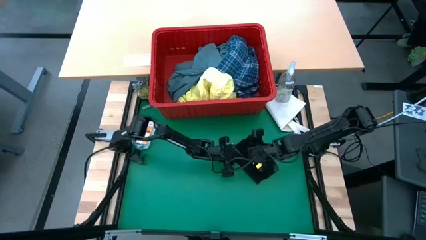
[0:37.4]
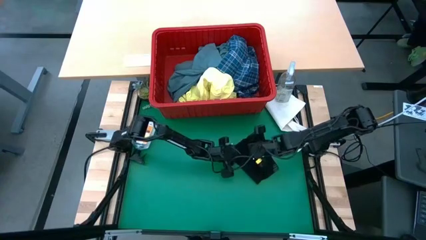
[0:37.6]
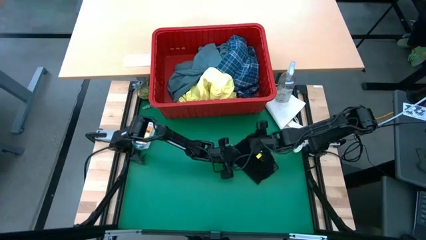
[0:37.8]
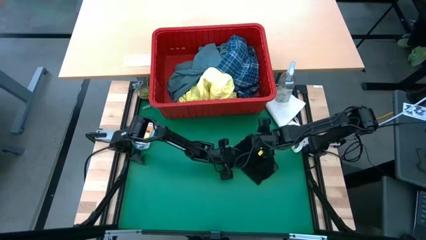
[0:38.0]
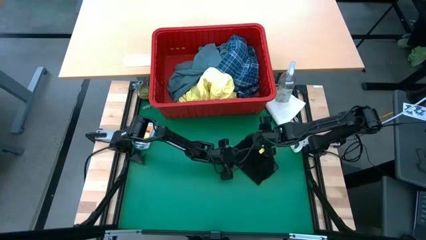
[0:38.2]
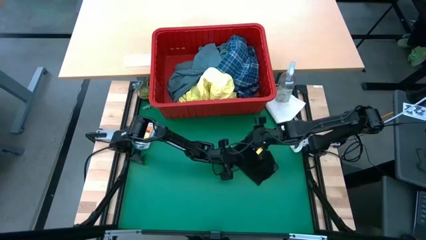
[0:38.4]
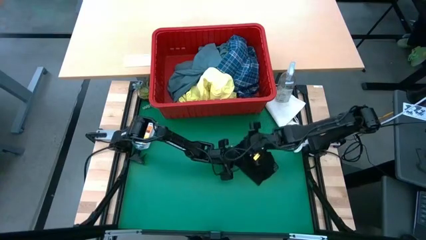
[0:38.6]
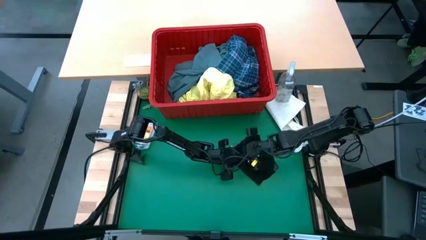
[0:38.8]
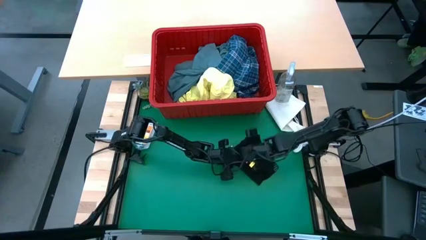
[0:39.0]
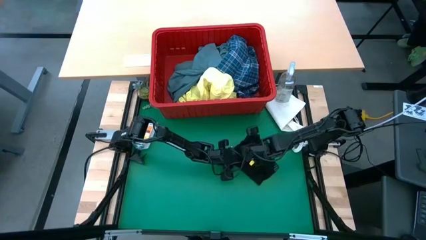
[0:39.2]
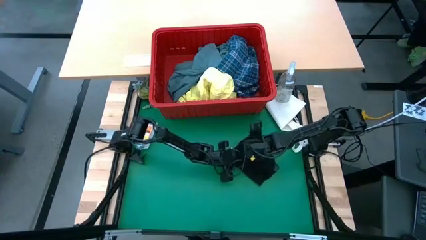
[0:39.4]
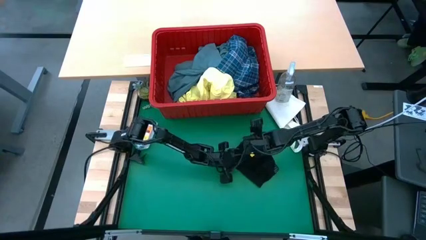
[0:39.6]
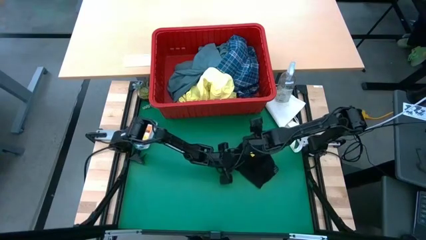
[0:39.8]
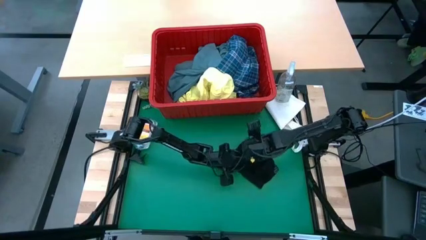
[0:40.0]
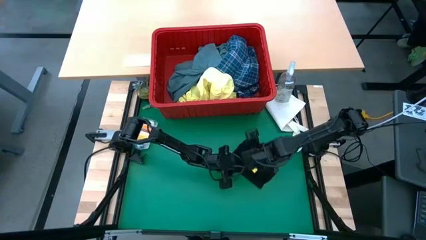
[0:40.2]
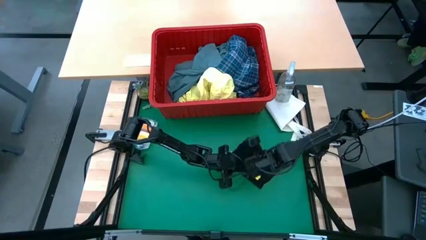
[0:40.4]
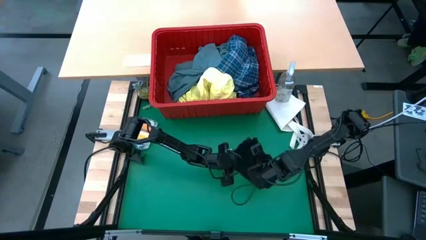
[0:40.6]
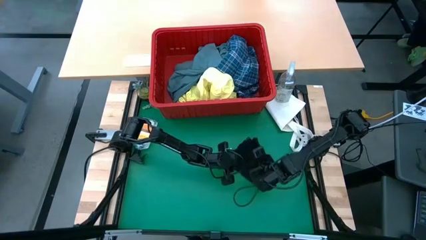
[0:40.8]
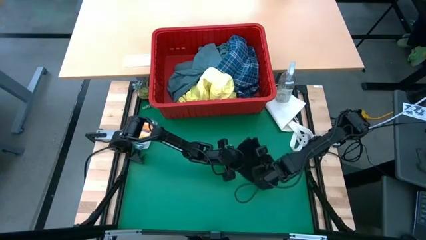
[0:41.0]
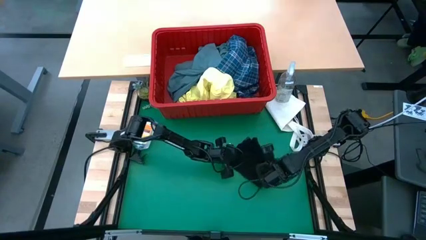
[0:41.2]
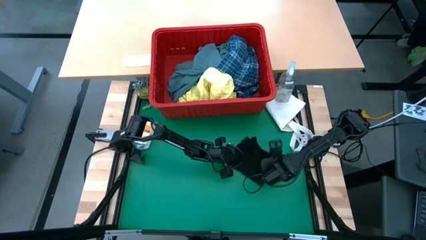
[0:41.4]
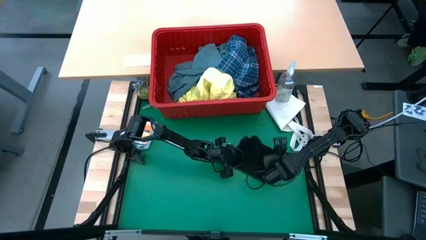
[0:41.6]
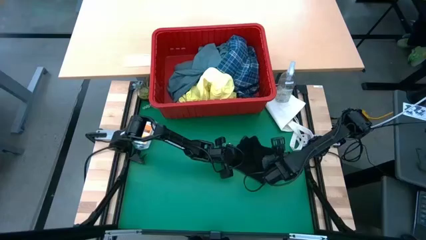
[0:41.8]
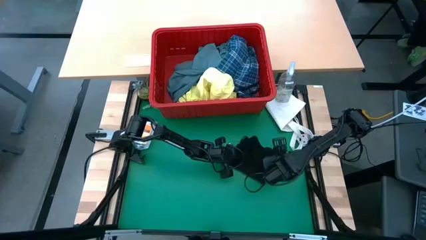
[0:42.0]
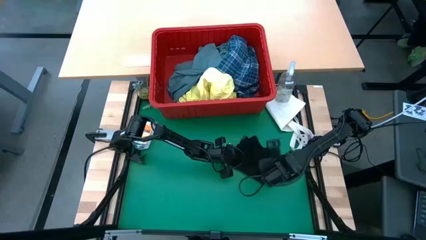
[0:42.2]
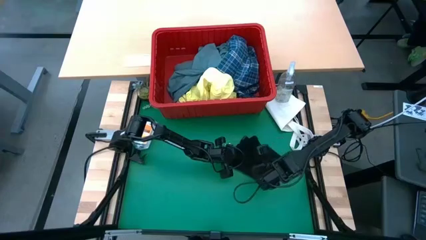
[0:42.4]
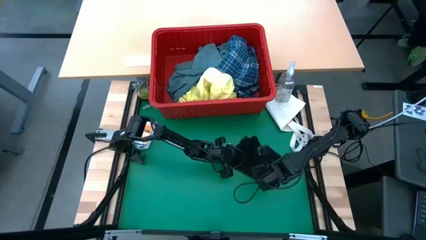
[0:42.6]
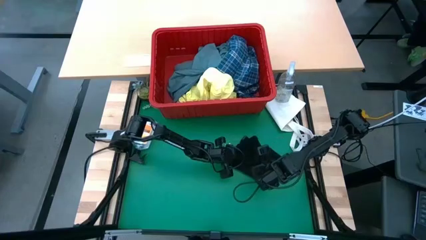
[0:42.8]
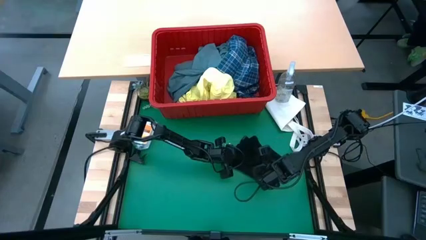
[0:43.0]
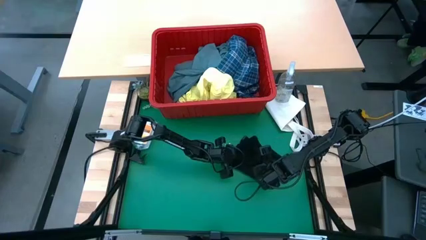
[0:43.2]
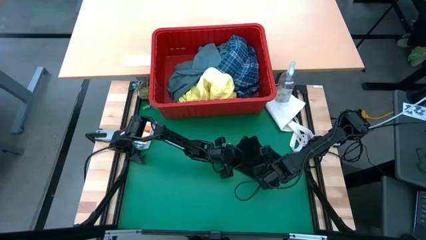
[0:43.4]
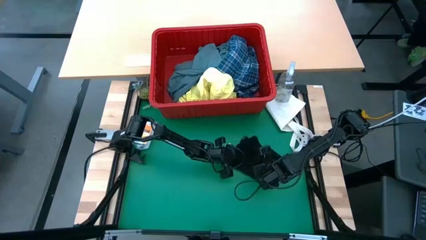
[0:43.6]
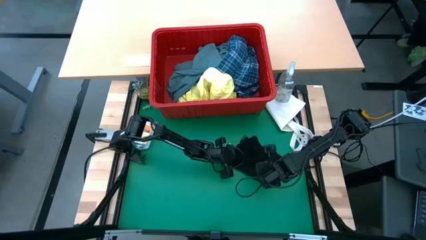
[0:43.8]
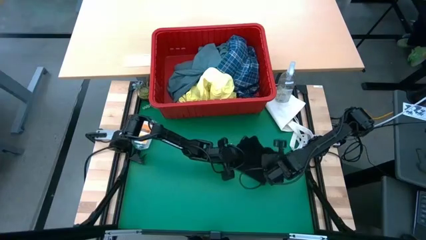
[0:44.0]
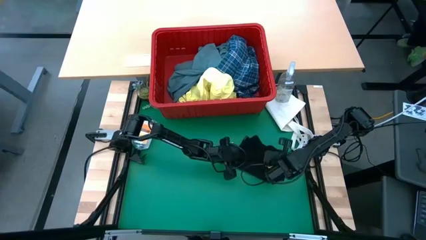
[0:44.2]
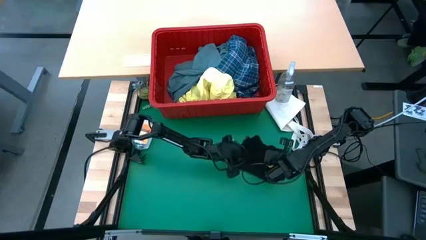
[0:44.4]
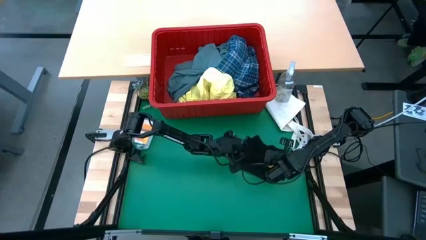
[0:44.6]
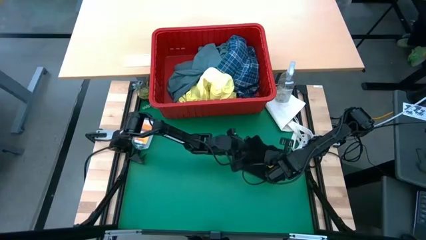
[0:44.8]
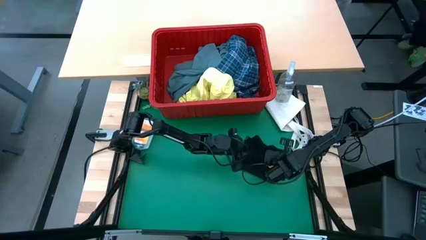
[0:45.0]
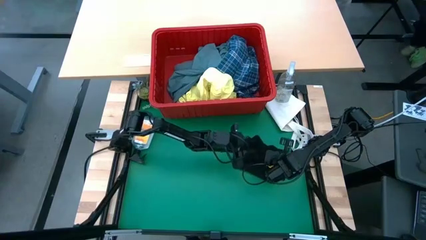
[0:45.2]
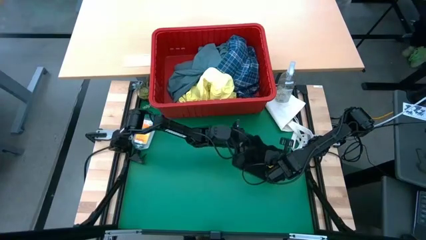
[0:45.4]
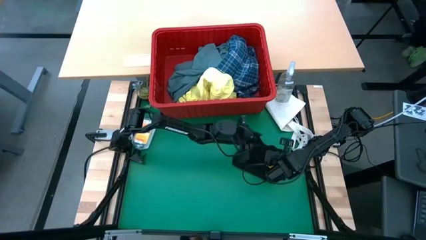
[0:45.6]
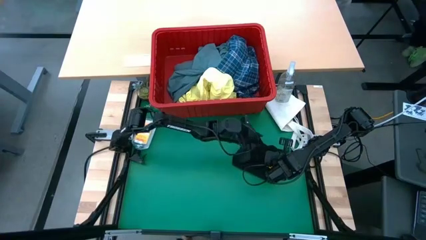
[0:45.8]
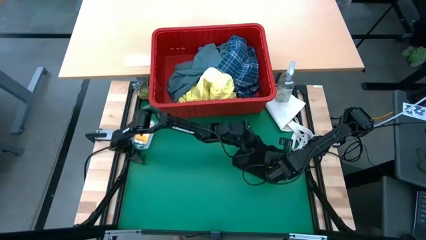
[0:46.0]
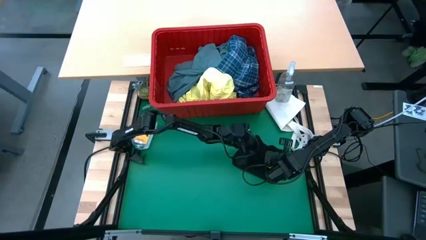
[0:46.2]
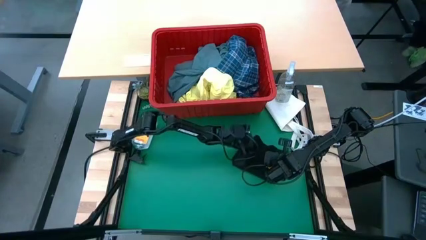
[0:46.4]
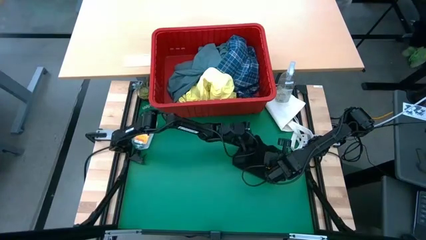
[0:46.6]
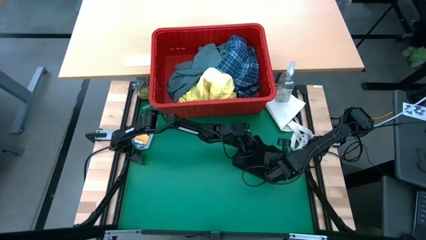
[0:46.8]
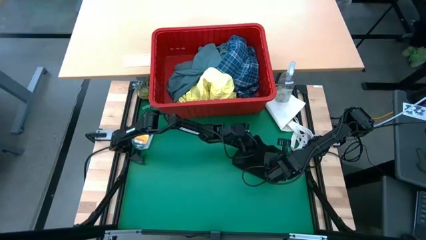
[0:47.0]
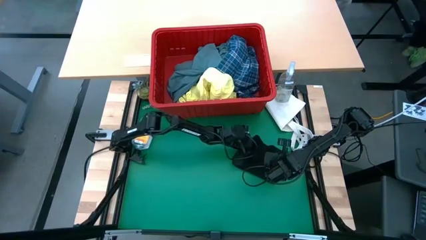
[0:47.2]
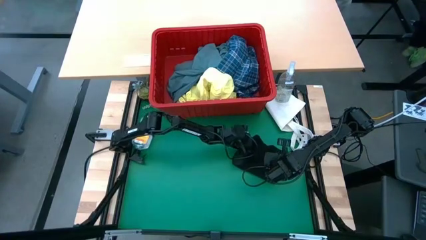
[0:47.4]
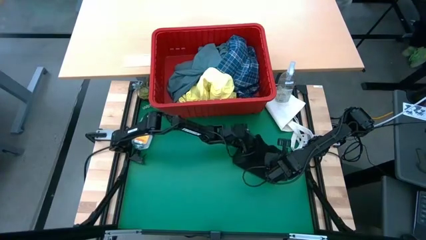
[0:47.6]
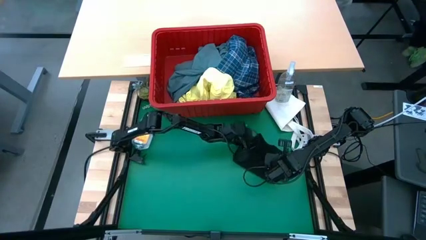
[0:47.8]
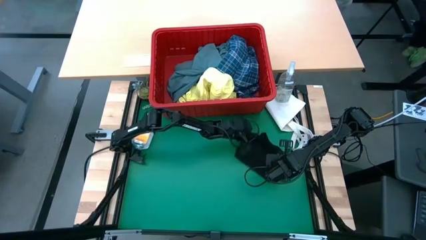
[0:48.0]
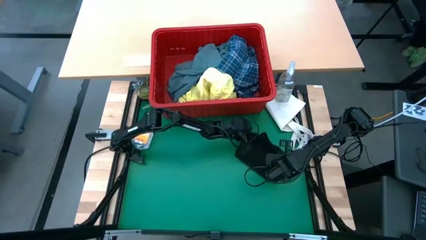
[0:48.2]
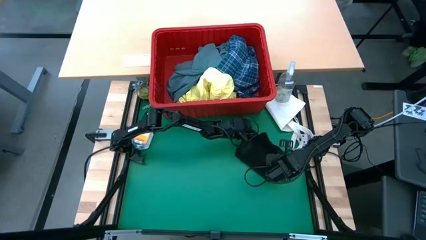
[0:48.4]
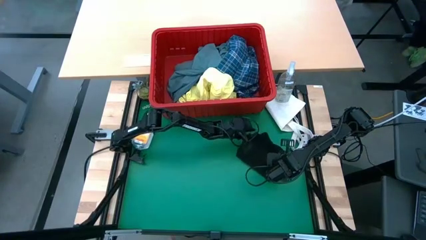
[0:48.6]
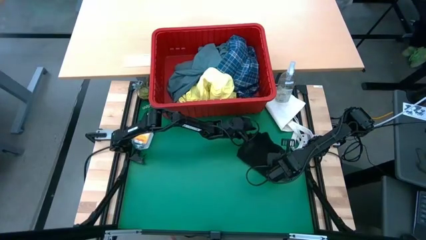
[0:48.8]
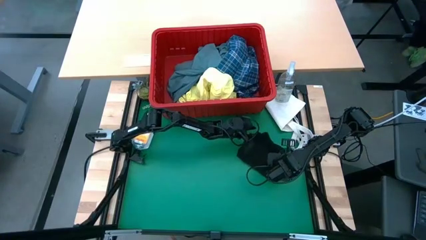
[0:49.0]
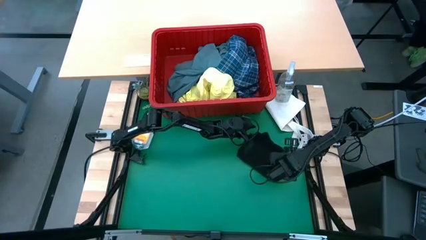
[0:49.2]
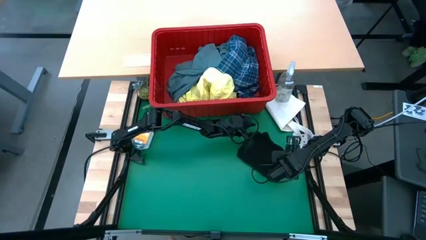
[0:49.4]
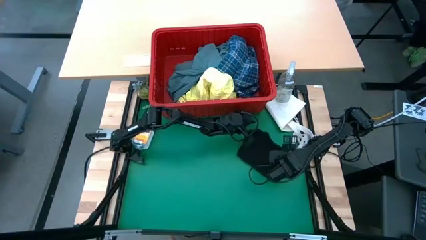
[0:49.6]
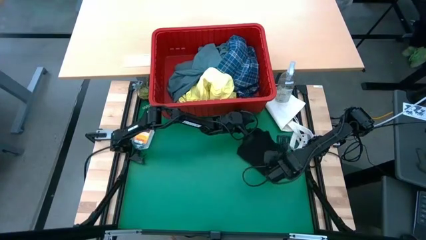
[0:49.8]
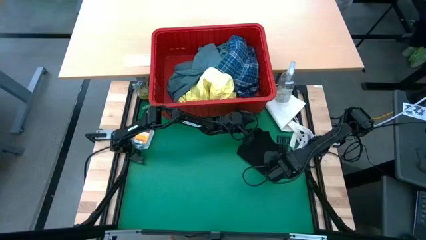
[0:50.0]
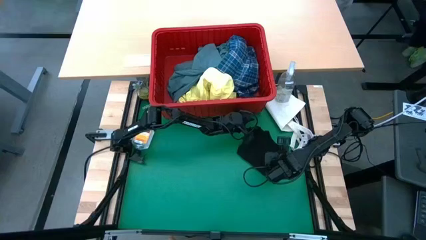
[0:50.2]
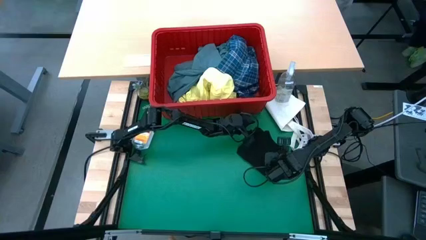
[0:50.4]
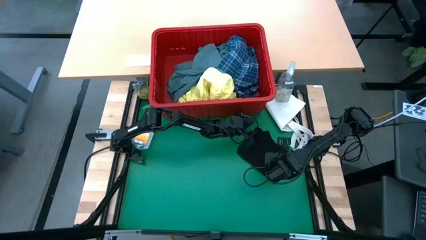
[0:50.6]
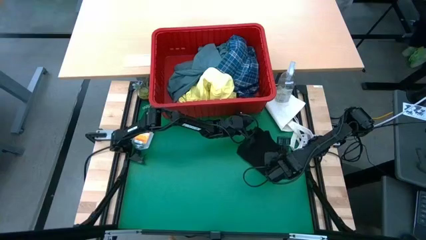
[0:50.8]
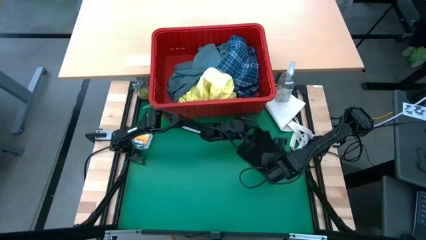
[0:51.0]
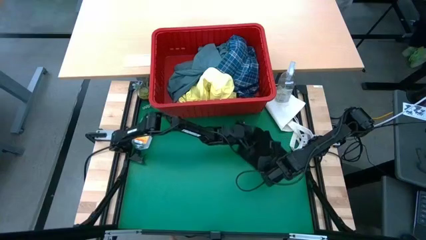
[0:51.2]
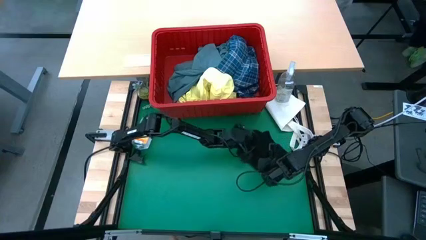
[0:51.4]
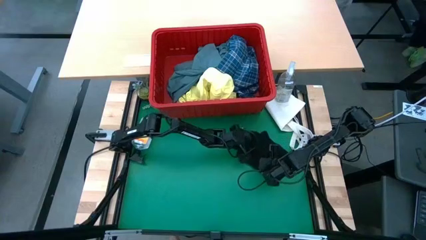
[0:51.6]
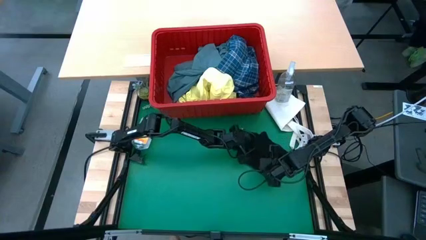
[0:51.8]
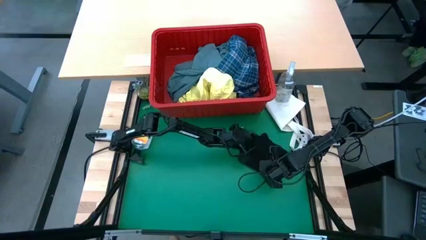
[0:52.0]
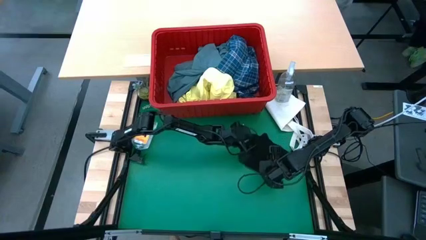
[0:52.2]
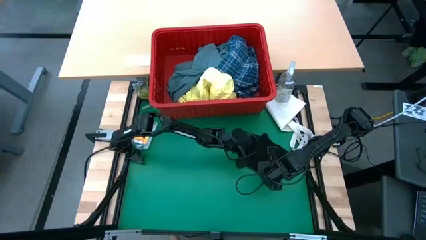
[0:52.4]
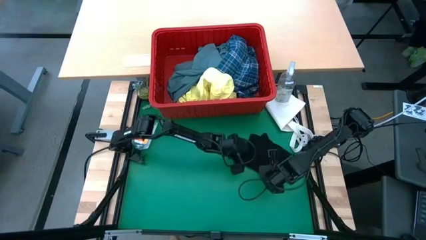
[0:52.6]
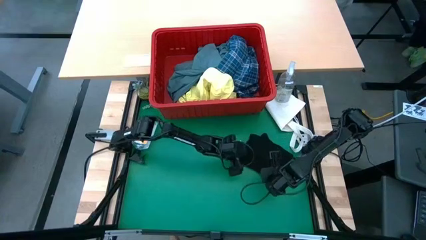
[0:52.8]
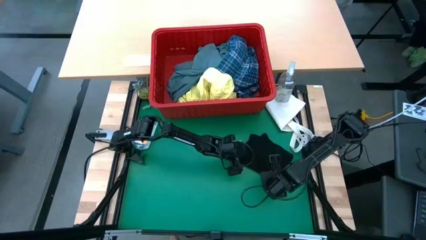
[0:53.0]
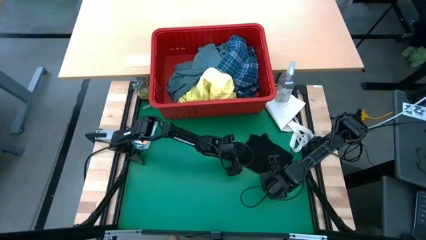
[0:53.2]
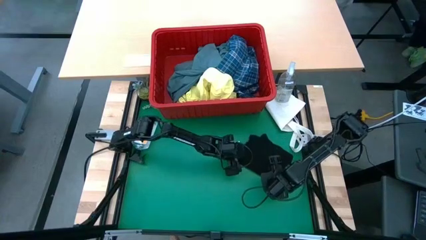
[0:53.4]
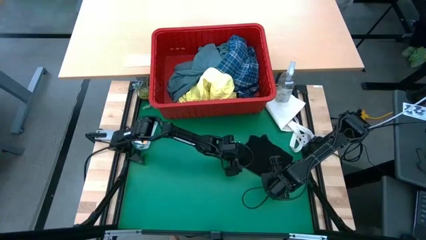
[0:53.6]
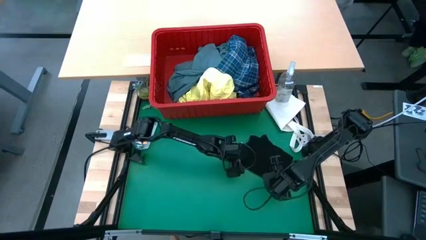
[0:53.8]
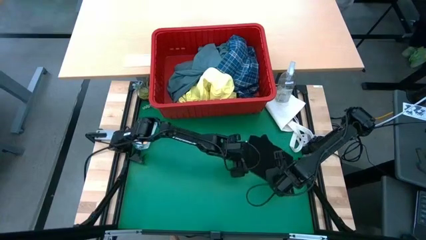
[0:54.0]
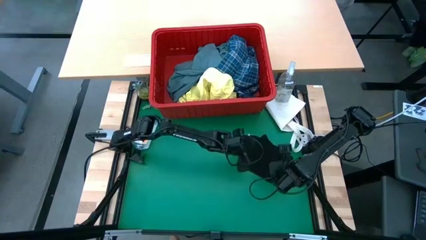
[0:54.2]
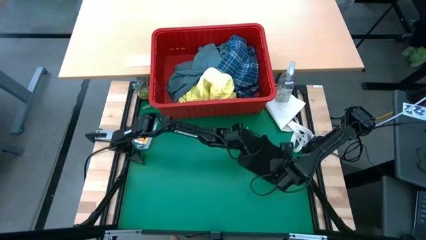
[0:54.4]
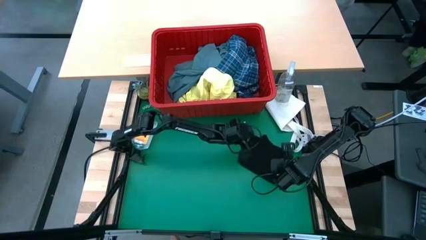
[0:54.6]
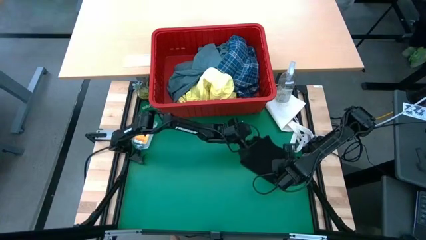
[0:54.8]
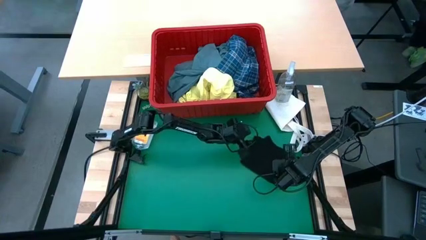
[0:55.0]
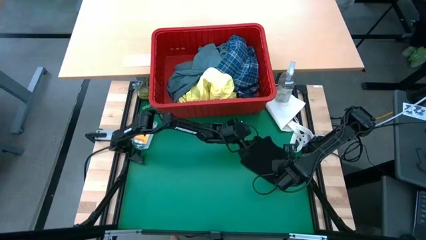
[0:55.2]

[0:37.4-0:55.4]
Task: Fold Laundry from Bin
Fold the black underwear shorts
